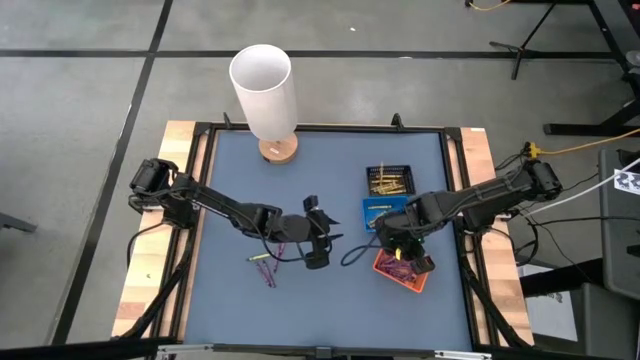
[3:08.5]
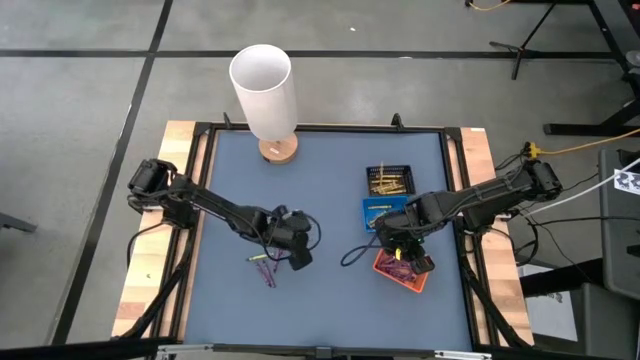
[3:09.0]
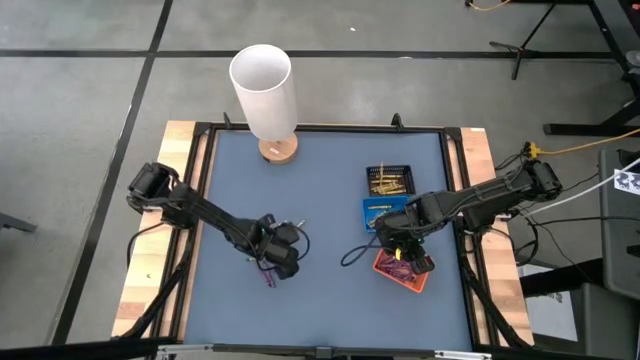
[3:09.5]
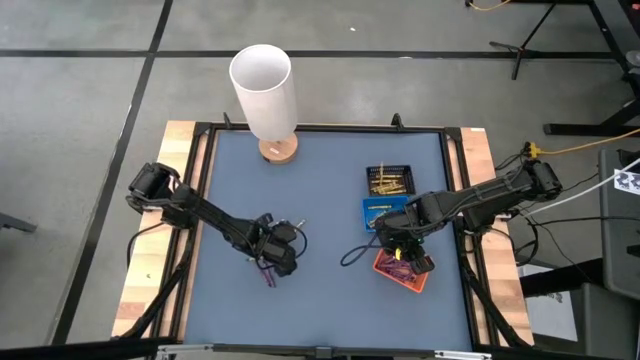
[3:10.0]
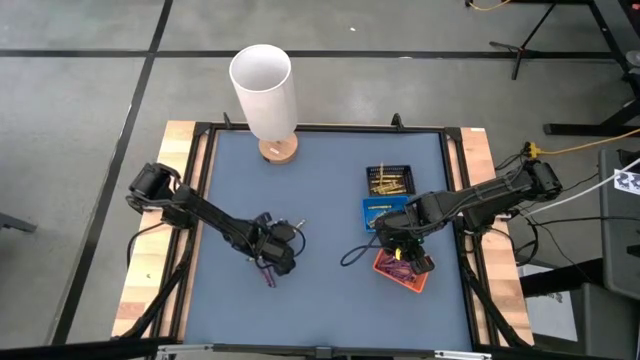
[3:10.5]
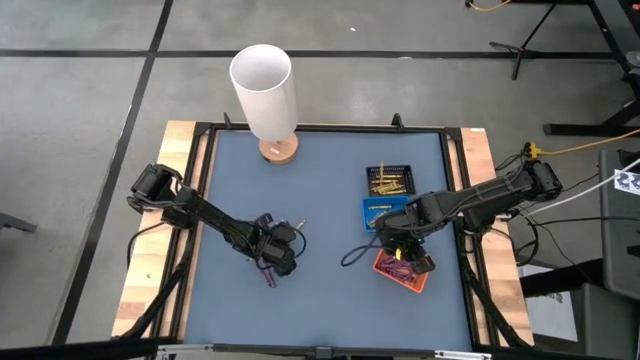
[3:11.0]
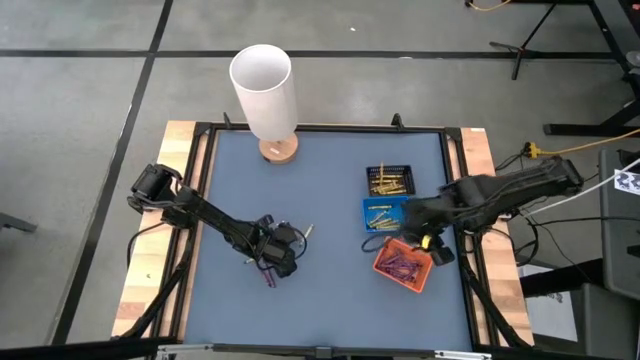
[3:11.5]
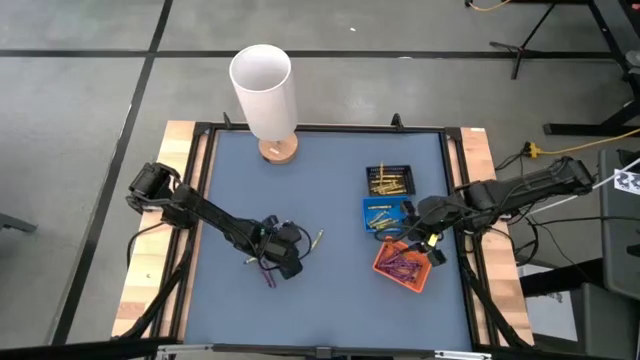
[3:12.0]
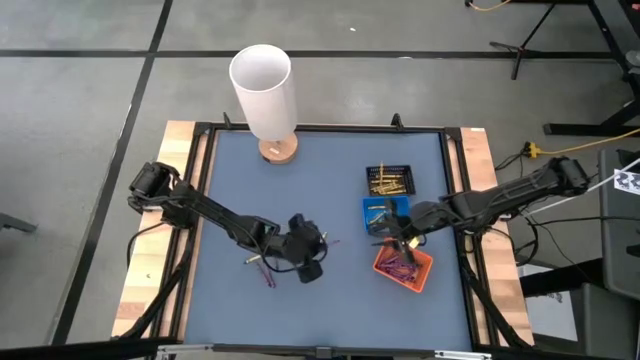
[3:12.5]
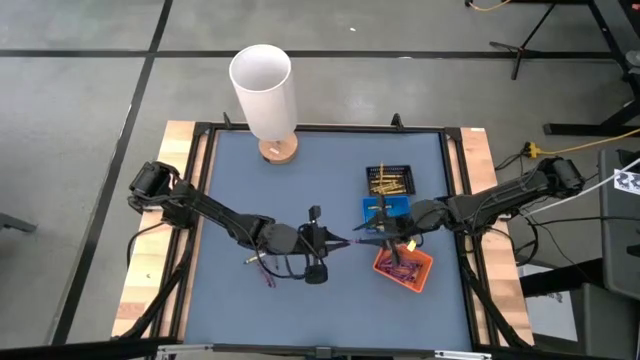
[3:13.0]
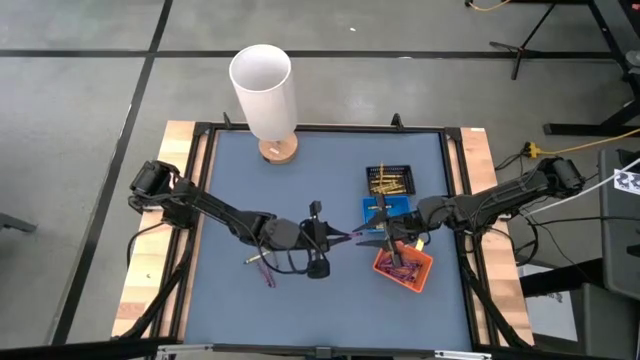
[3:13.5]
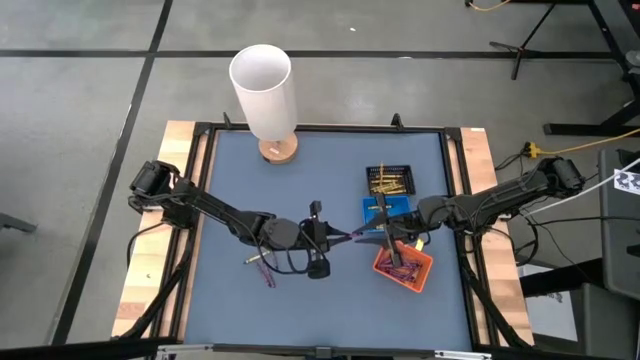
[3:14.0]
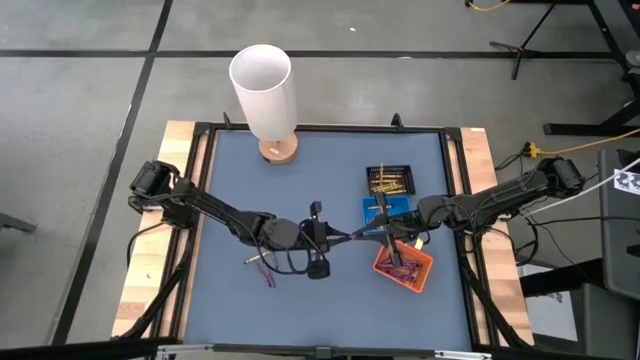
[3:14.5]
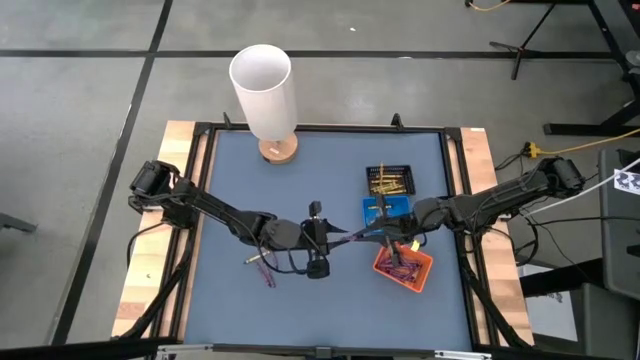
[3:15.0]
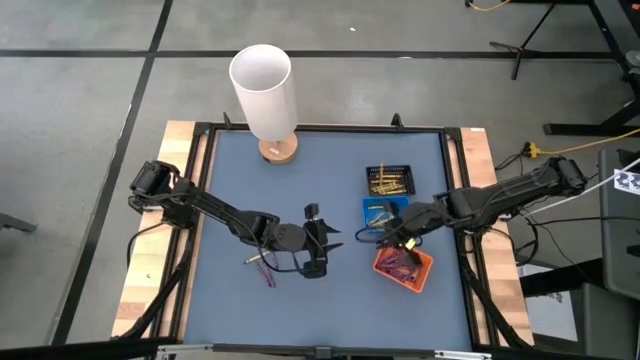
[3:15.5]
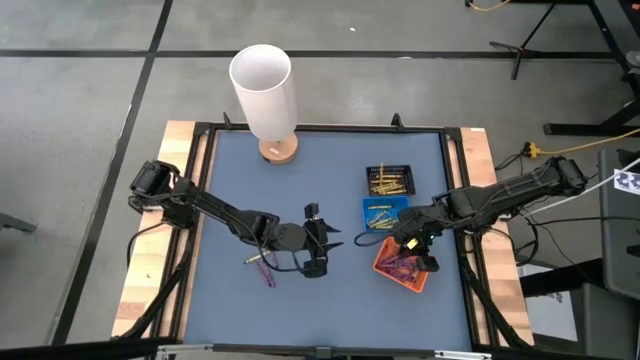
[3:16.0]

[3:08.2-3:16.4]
Task: Sort crayons
Put the purple crayon into the orange bin

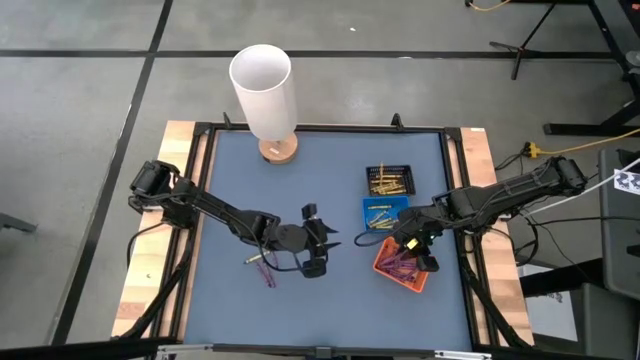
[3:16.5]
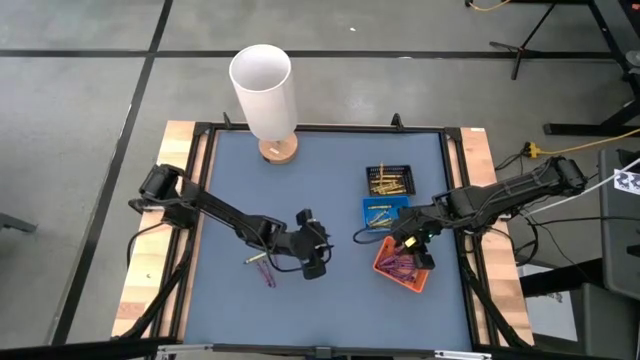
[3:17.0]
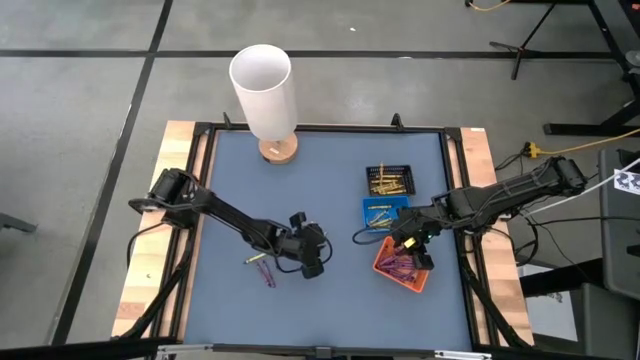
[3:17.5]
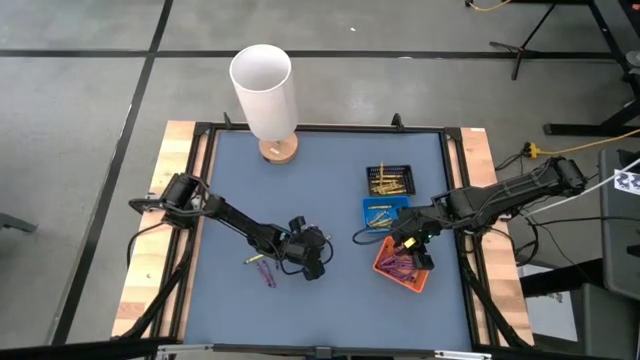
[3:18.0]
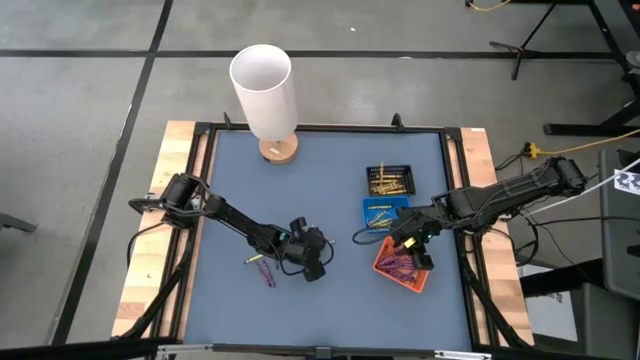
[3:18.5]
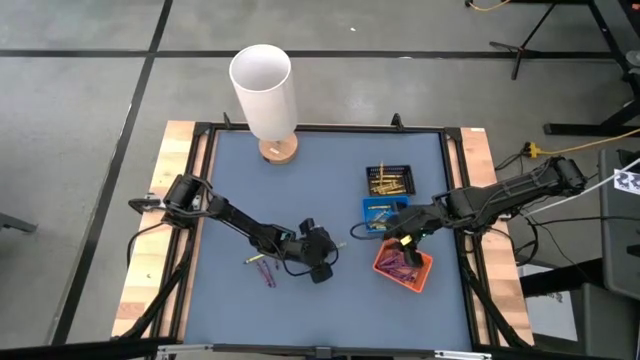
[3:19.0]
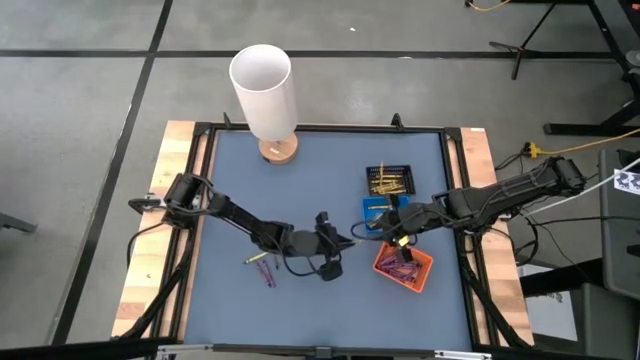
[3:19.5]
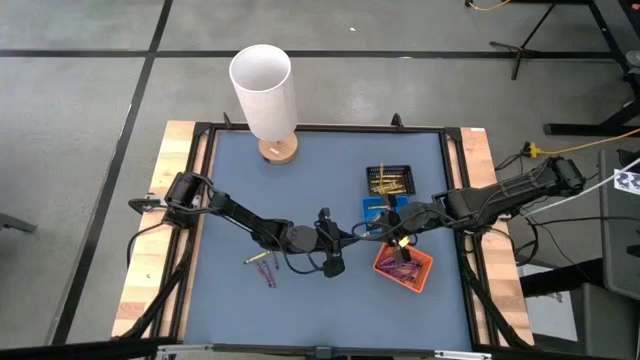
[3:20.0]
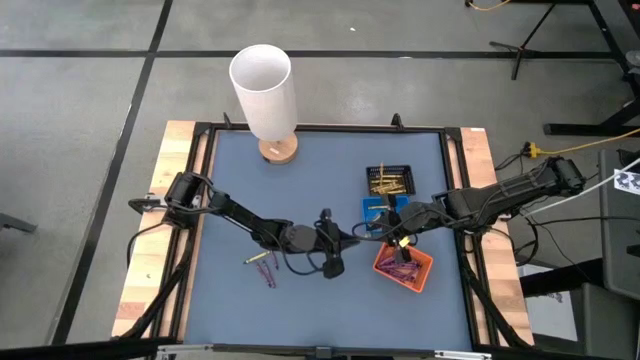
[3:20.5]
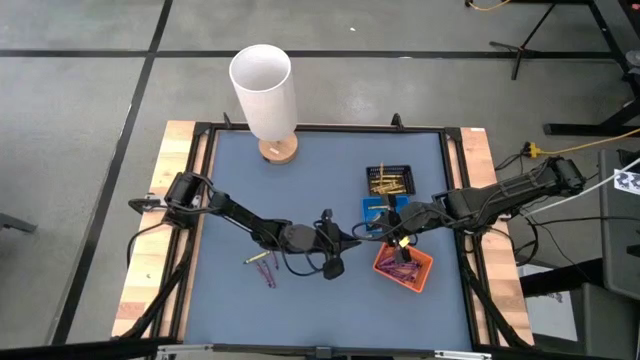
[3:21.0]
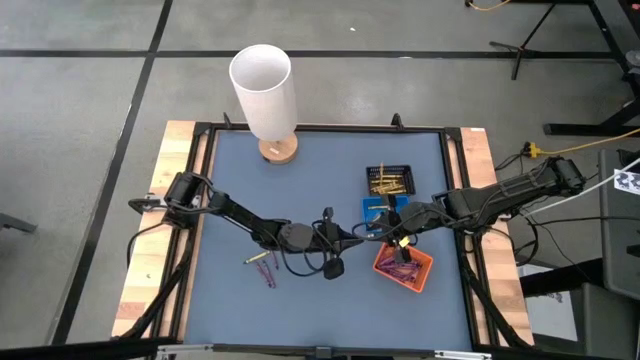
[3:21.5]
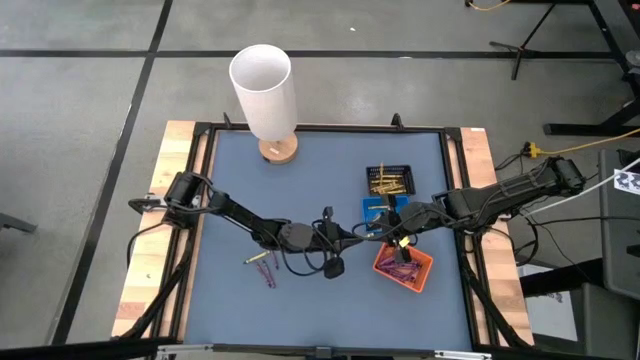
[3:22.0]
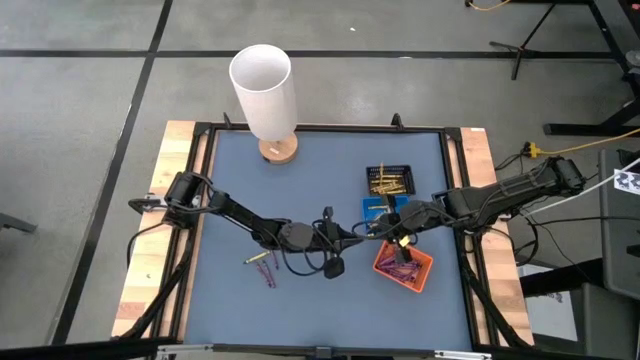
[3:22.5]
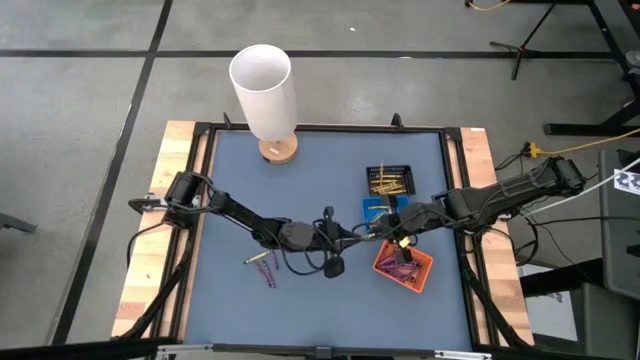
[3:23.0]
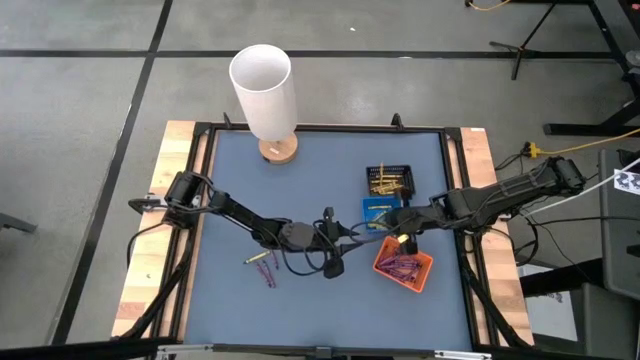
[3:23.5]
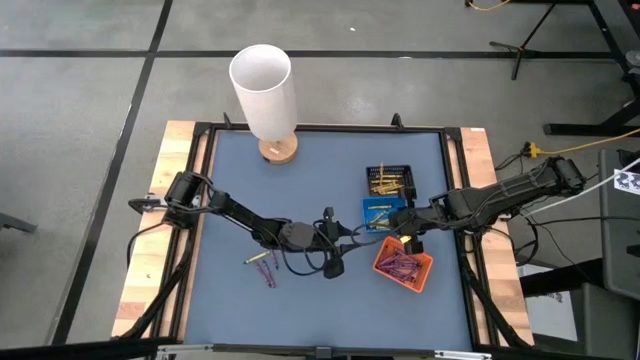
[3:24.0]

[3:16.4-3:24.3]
Put the green crayon into the blue bin

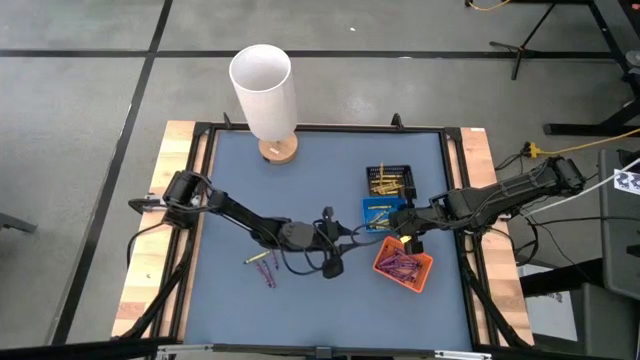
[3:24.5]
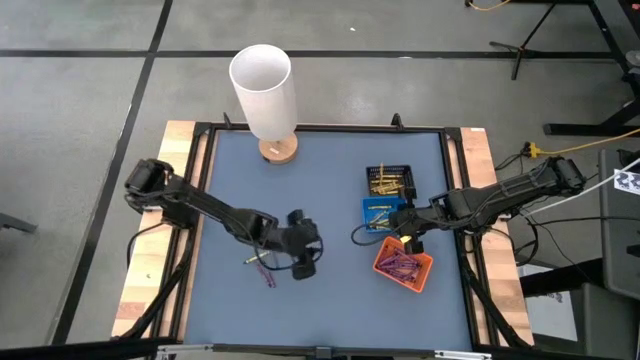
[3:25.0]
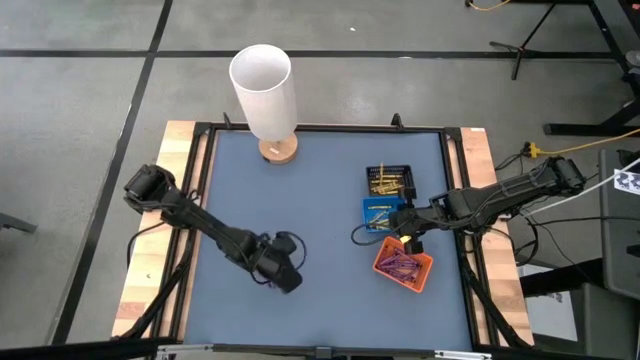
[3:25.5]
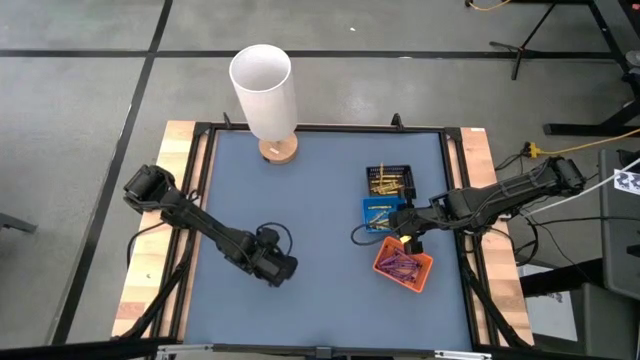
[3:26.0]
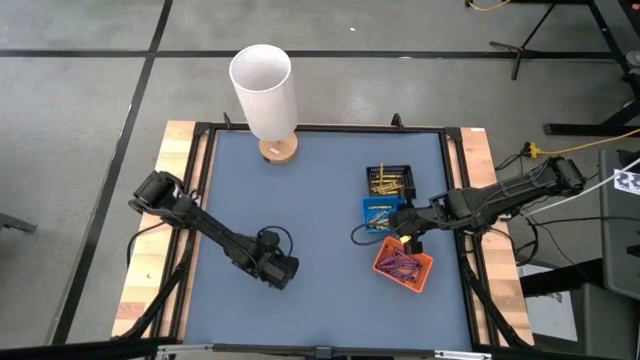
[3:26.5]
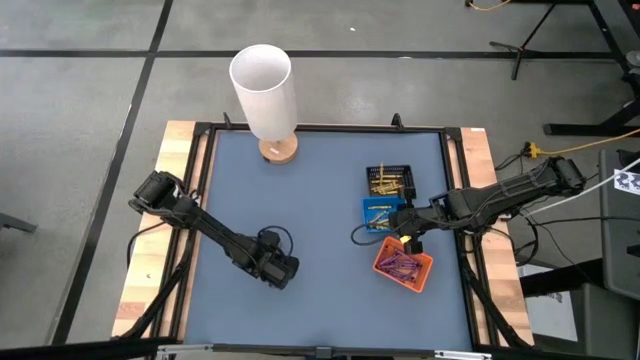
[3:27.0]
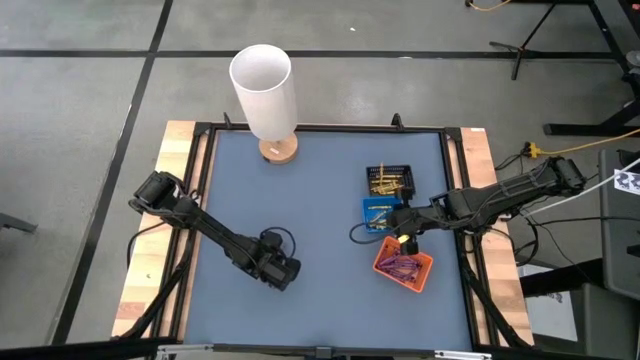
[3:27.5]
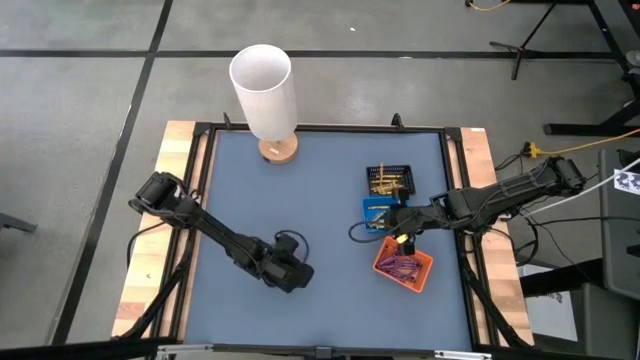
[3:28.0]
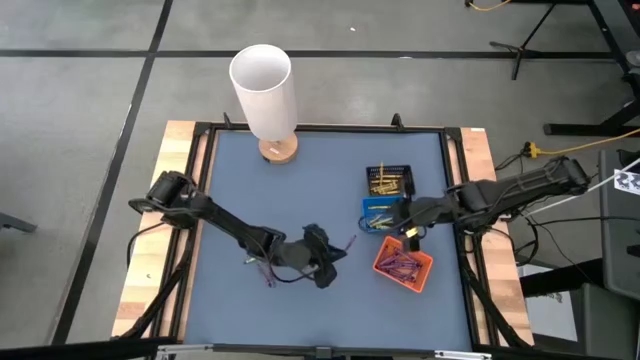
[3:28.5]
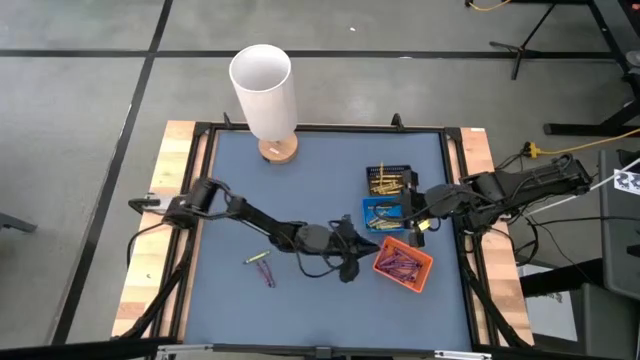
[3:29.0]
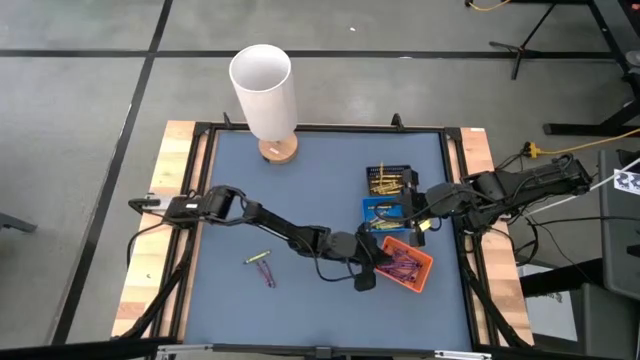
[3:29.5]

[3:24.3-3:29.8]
Put the purple crayon into the orange bin
